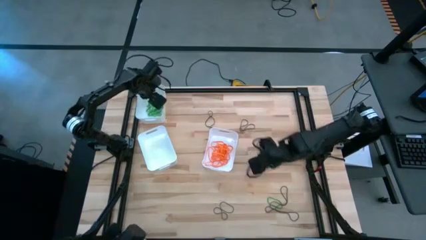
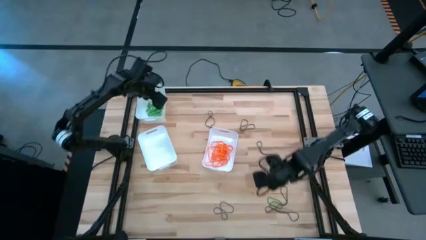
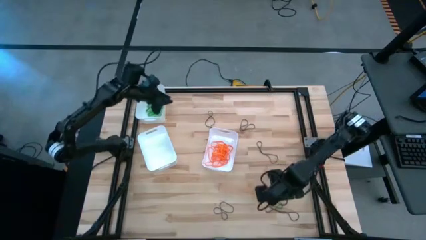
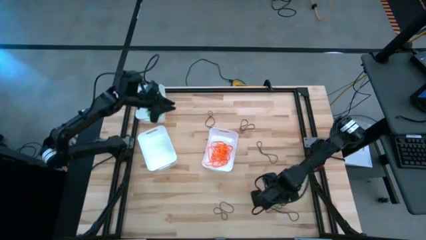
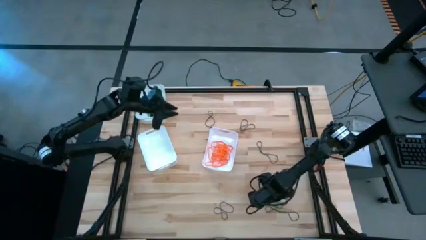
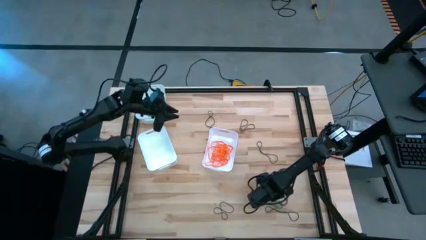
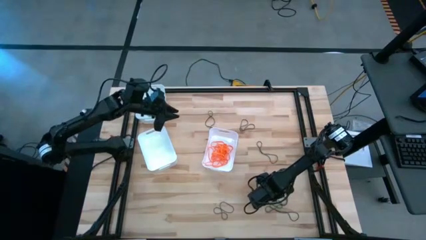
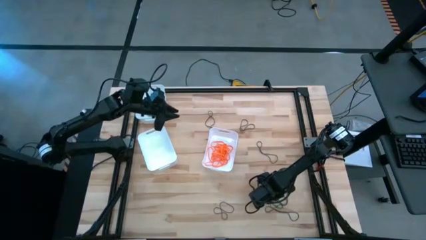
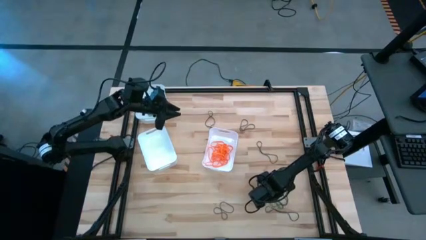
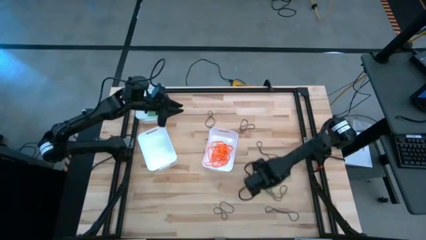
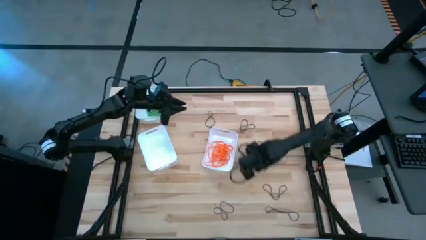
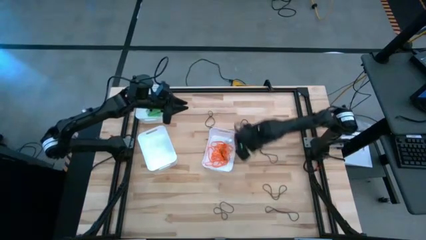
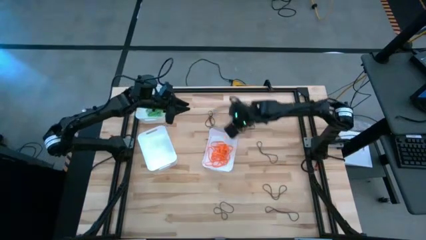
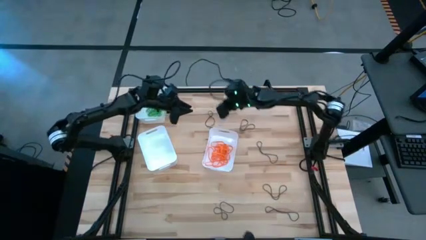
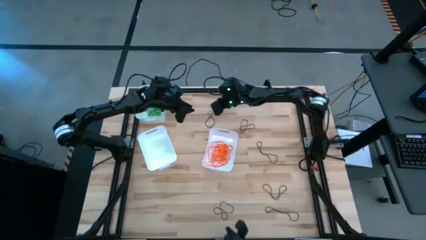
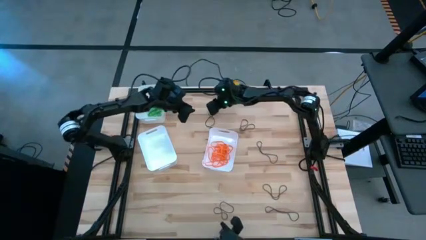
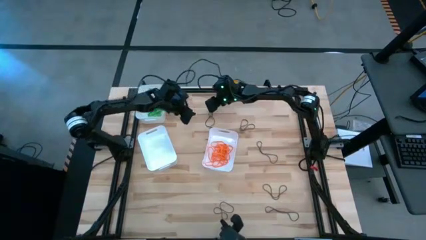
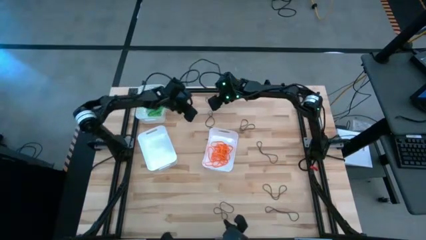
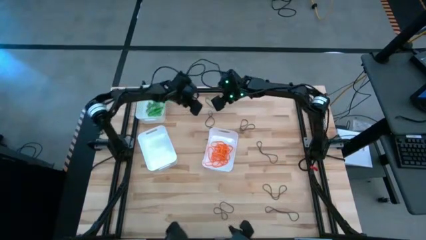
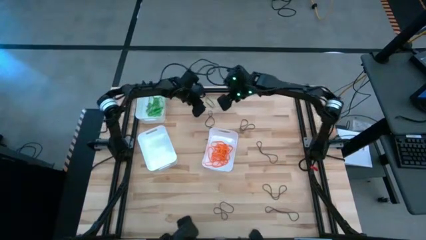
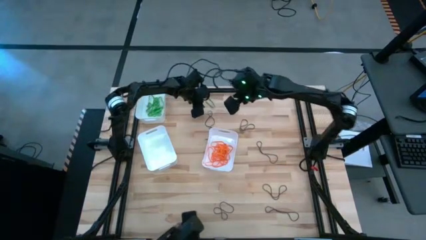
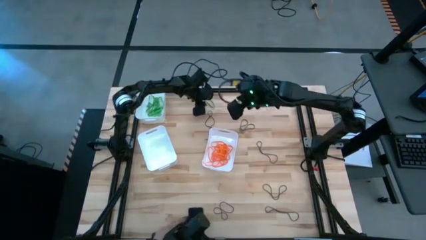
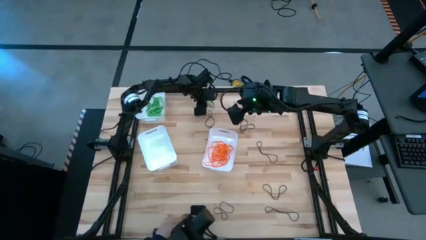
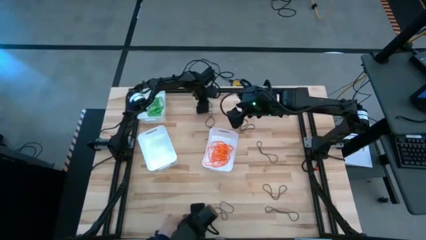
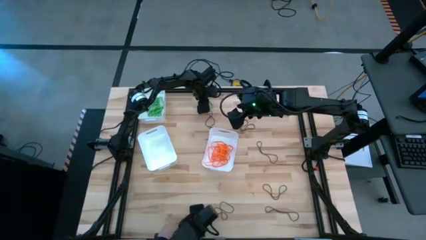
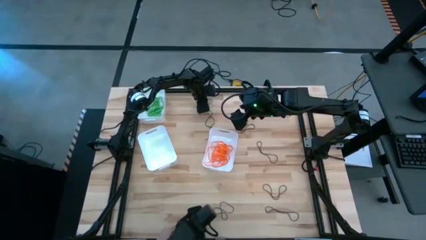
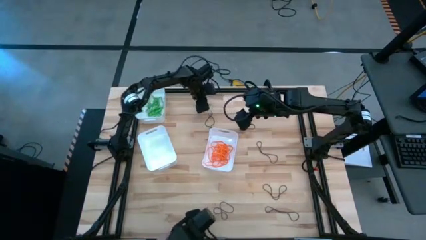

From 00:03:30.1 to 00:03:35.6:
Task: Sort rubber bands into baskets
Put the green rubber band into the top white bin

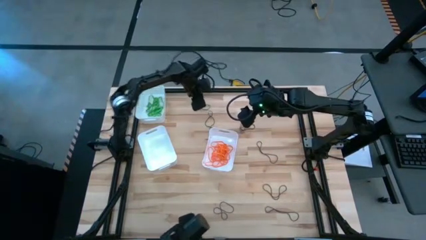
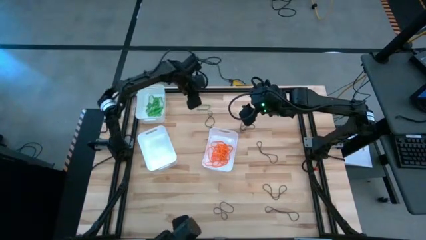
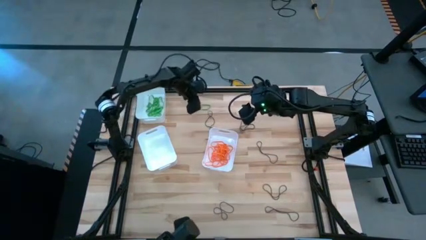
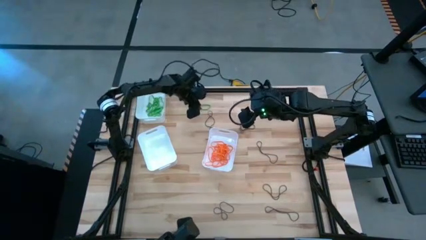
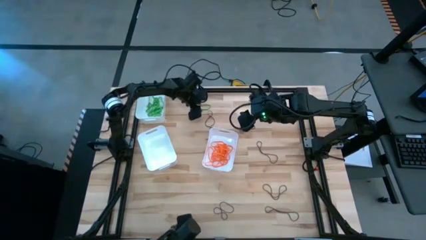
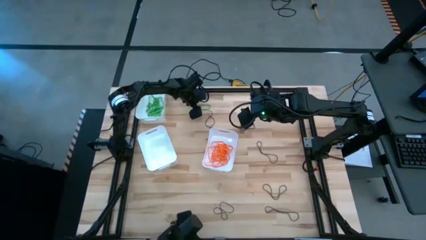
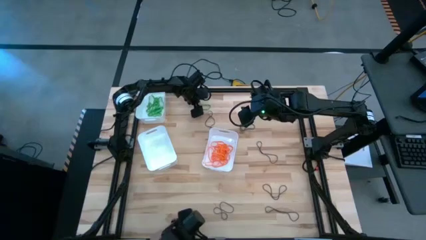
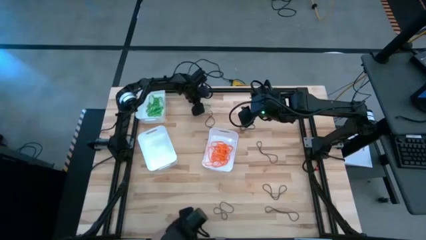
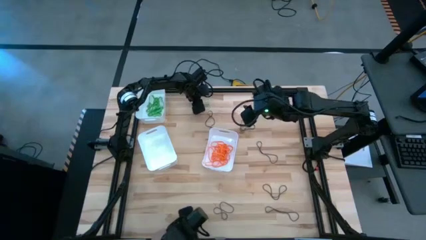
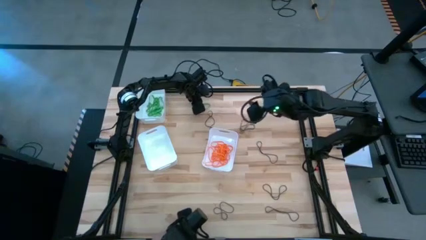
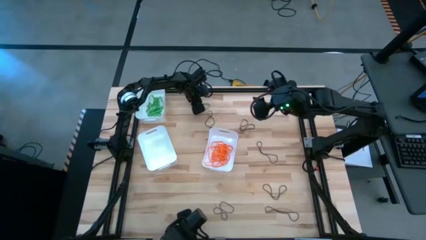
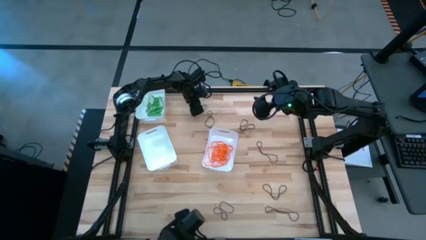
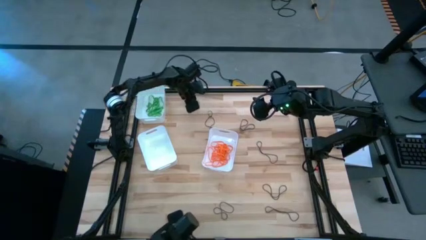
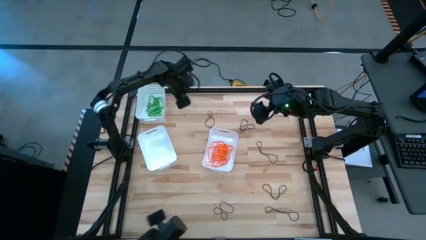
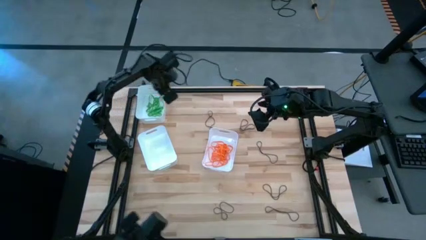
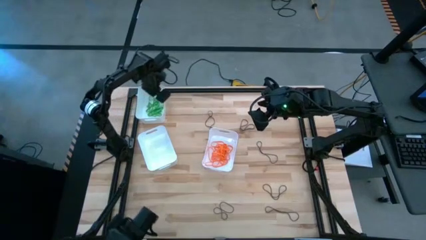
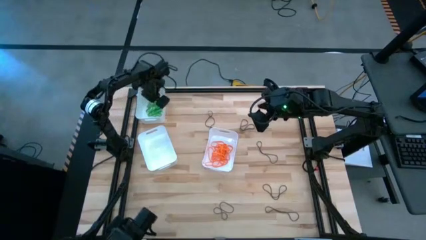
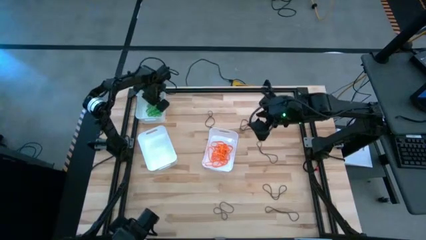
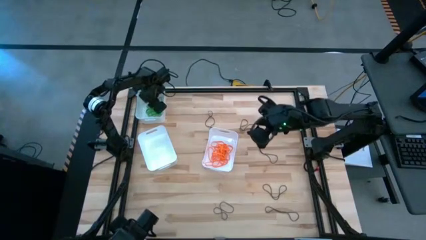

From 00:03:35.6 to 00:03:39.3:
Put the green rubber band into the top white bin

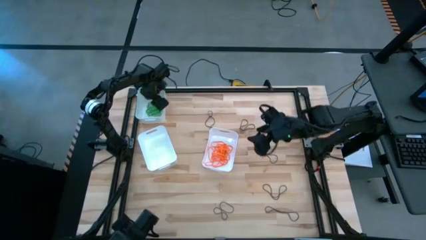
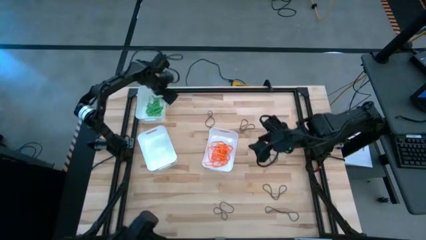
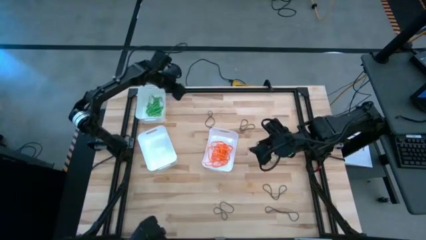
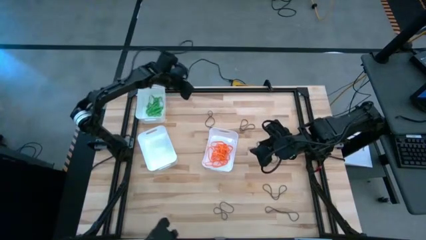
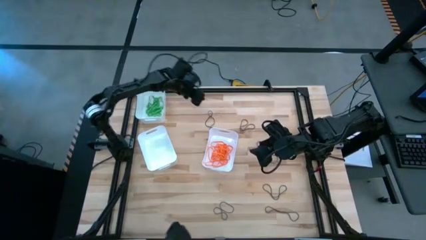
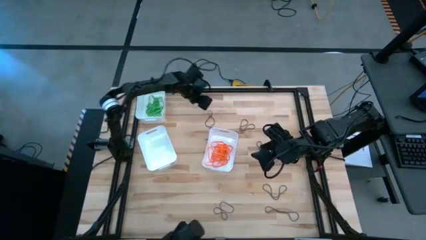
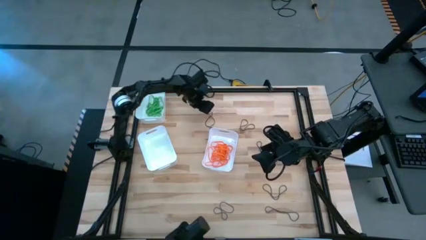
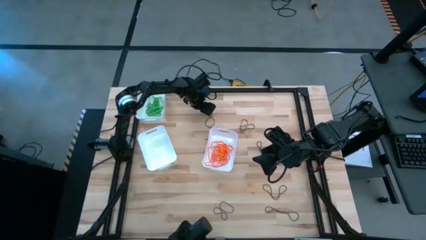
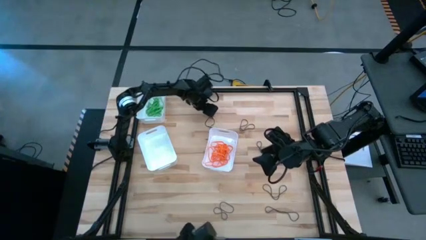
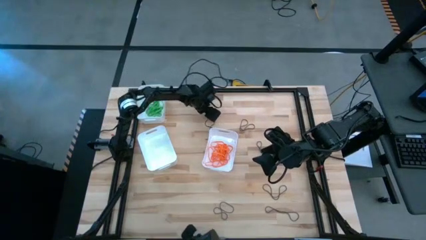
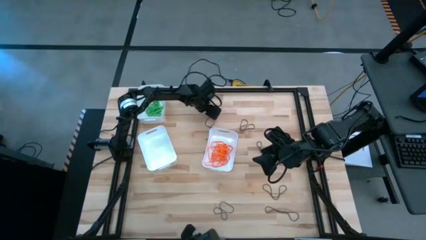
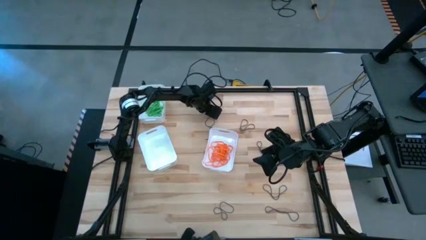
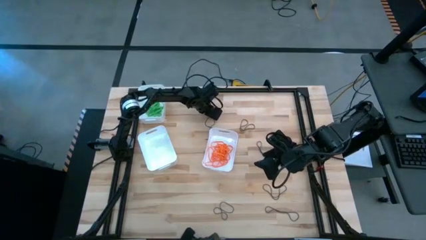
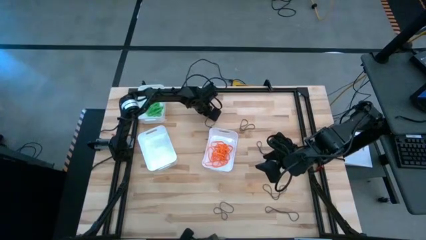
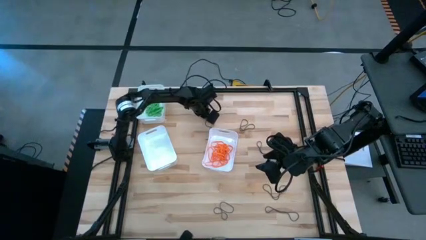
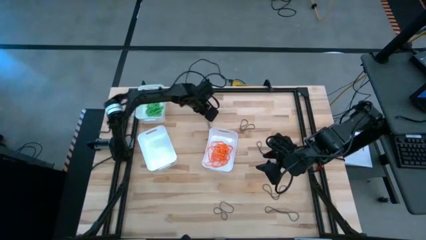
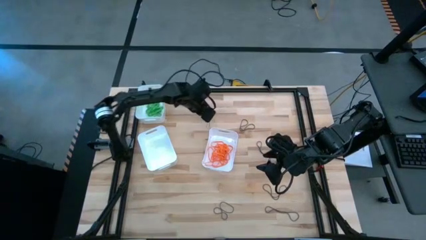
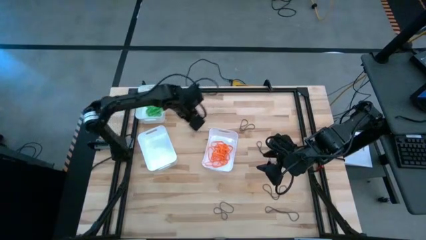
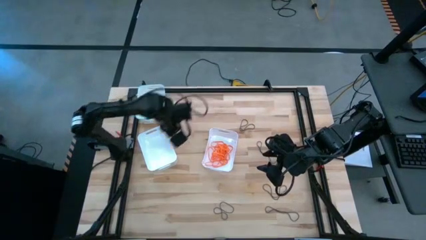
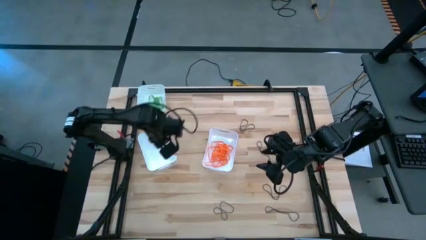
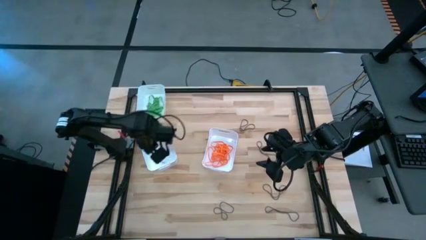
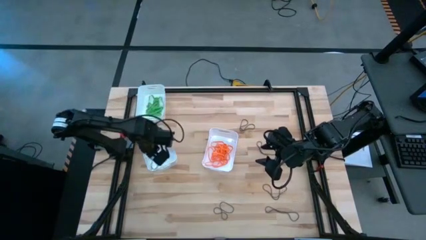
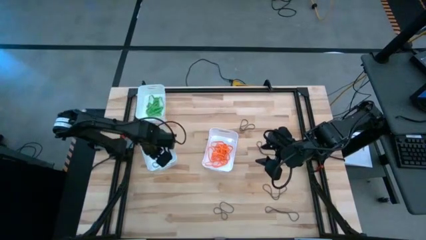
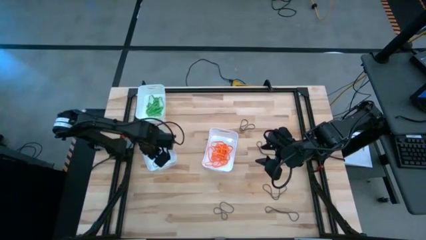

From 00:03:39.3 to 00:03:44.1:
Put the violet rubber band into the bottom left white bin

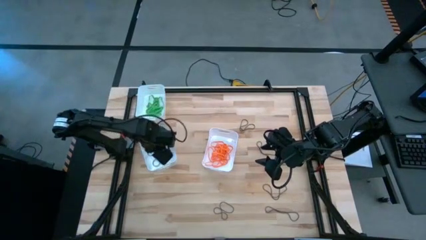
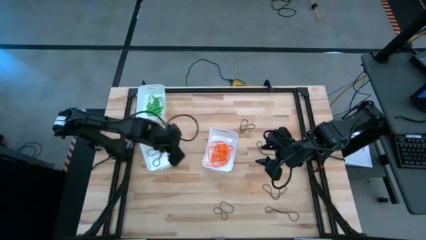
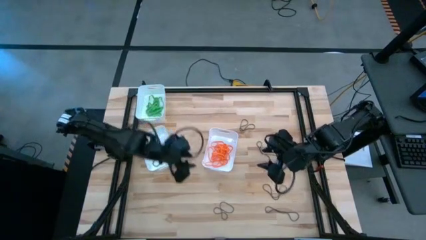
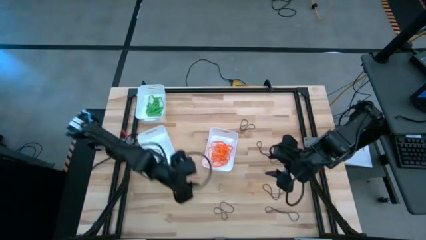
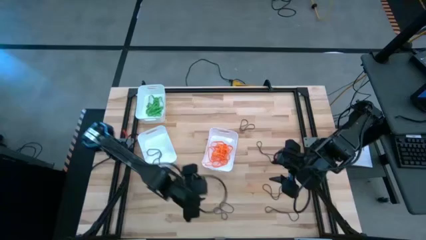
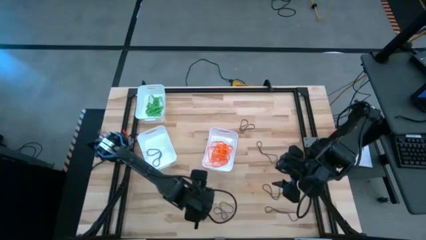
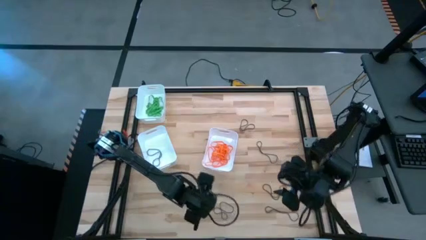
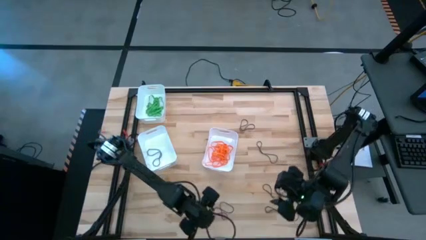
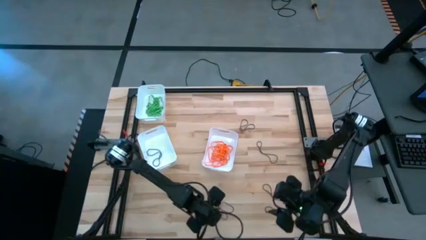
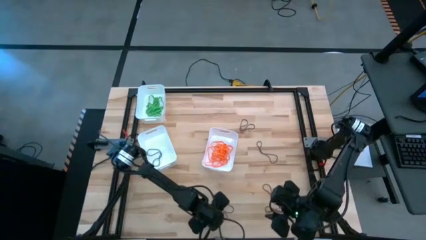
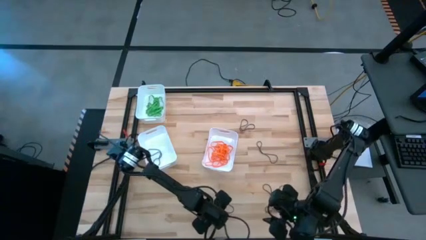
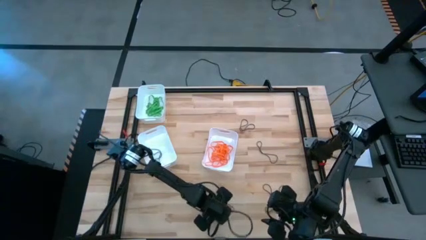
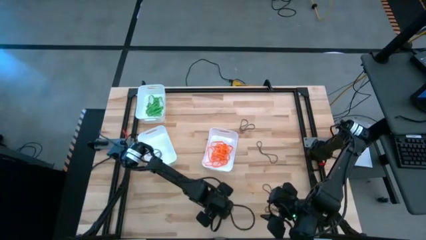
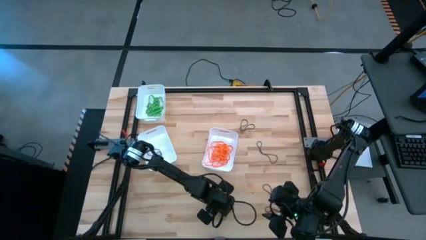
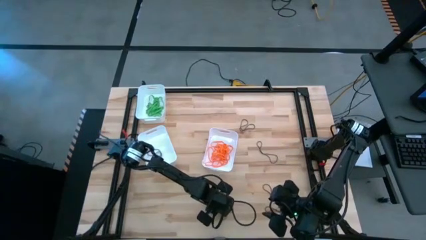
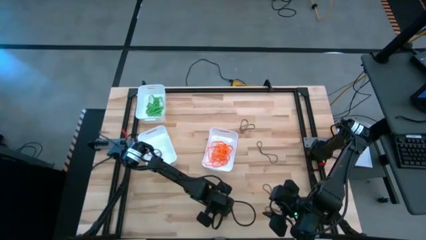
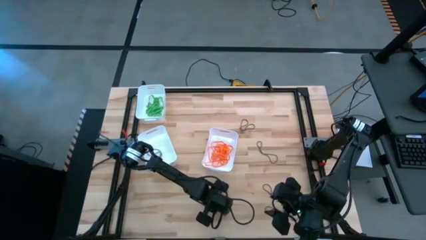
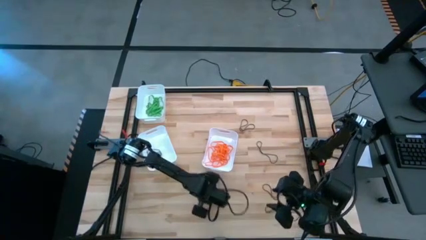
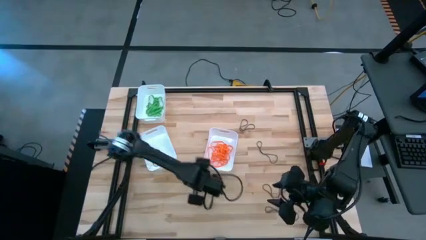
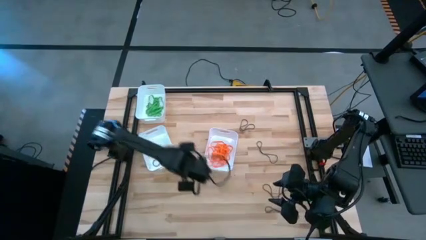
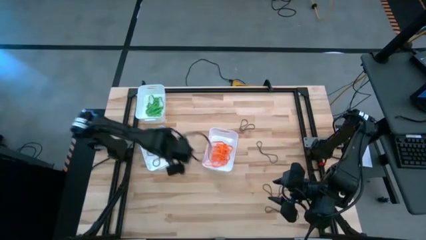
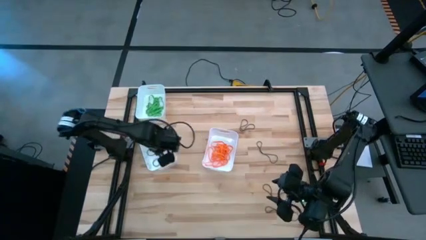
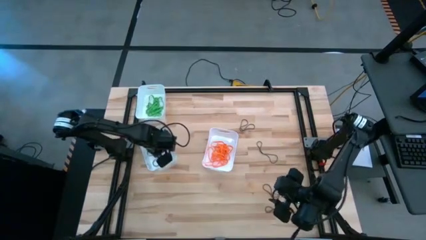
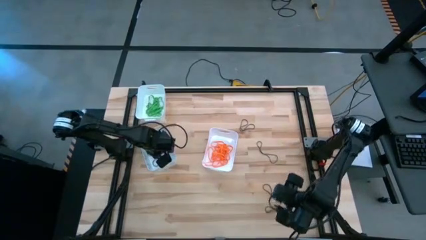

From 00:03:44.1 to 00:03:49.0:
Put the violet rubber band into the bottom left white bin
